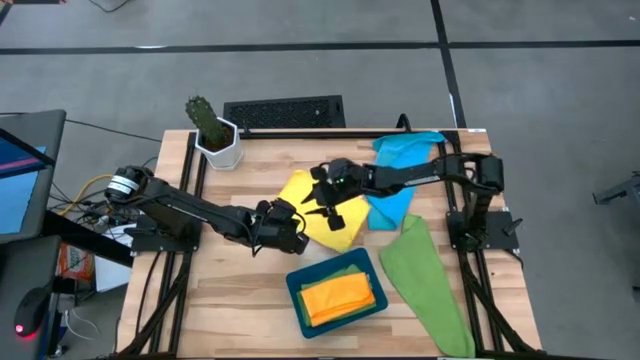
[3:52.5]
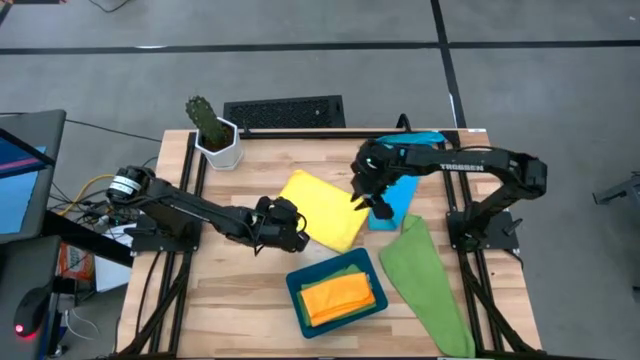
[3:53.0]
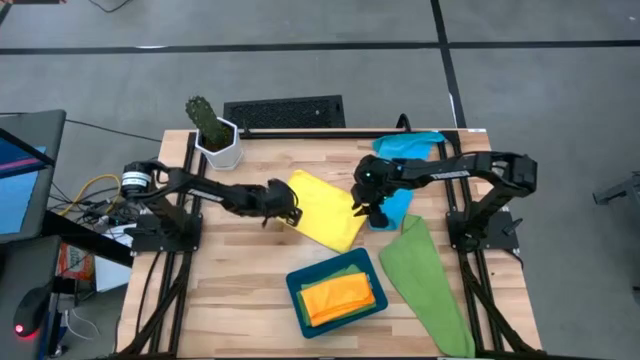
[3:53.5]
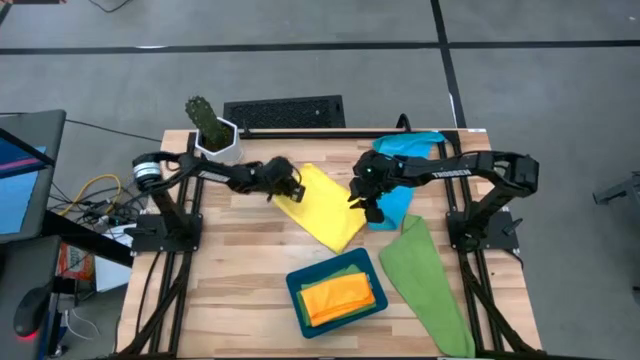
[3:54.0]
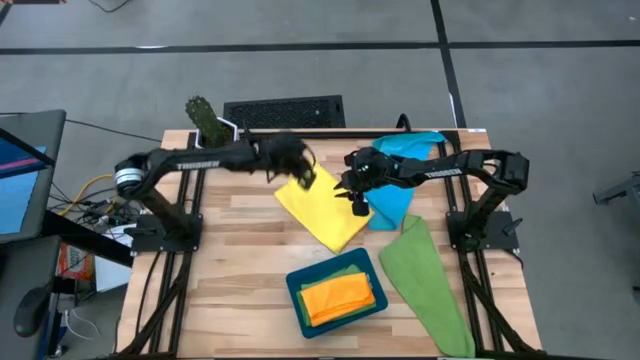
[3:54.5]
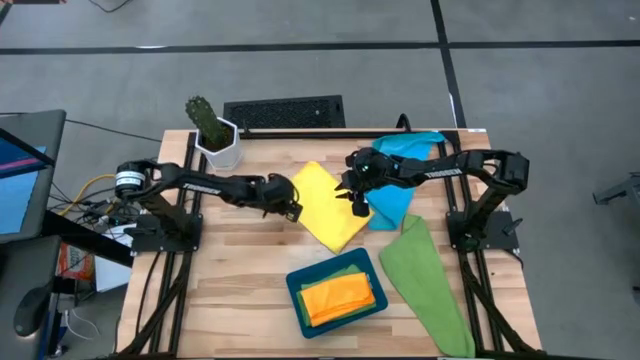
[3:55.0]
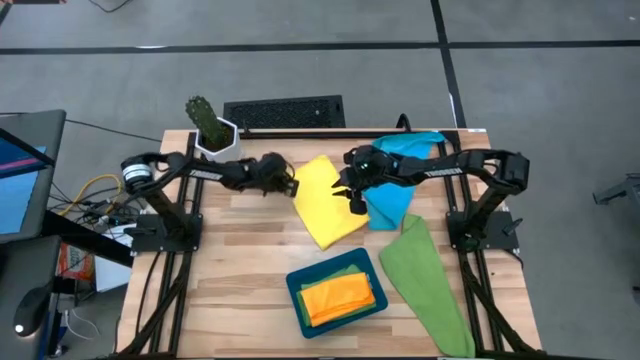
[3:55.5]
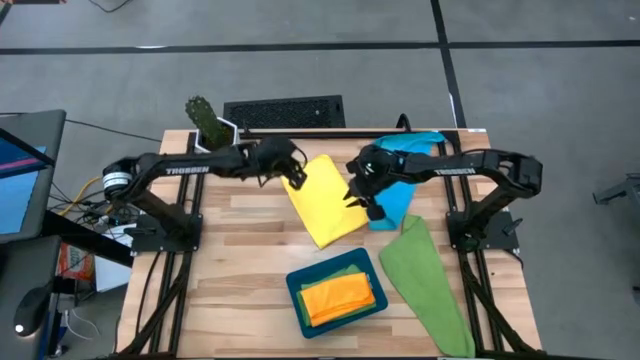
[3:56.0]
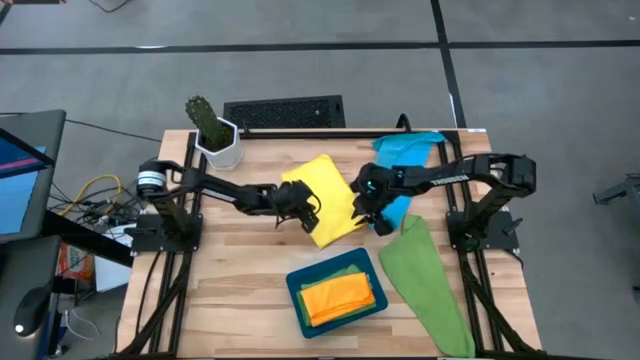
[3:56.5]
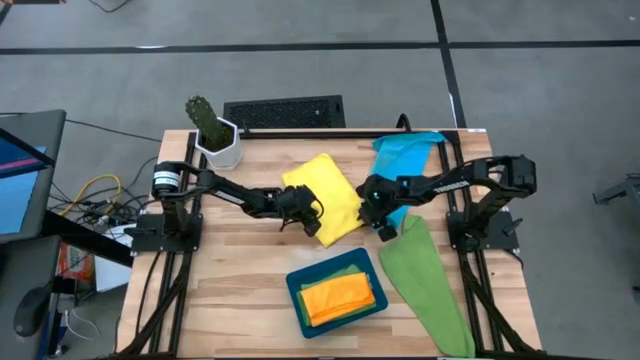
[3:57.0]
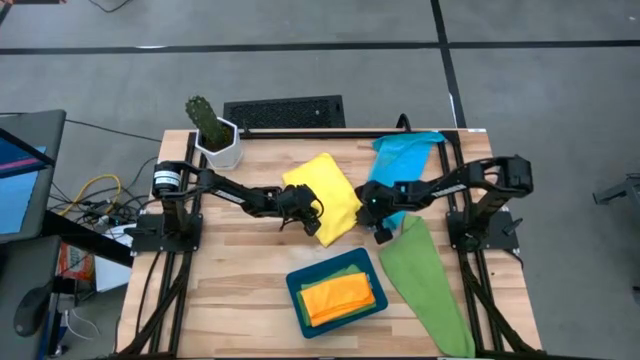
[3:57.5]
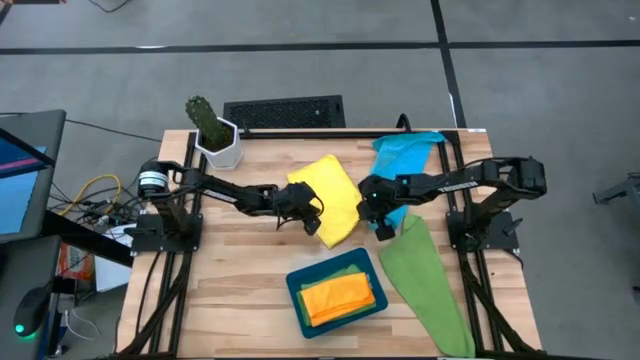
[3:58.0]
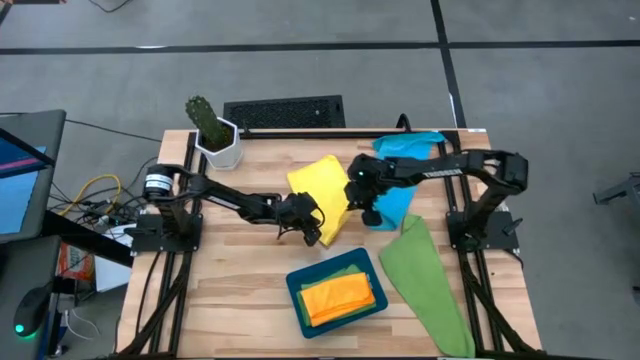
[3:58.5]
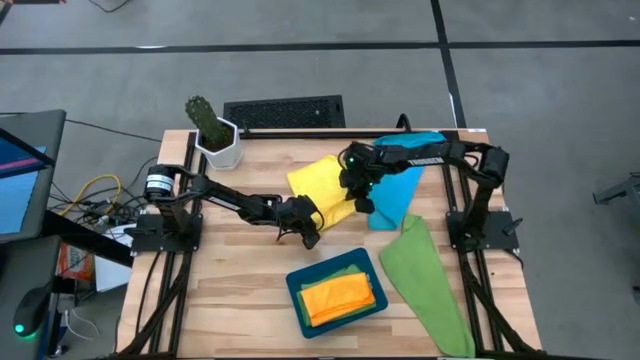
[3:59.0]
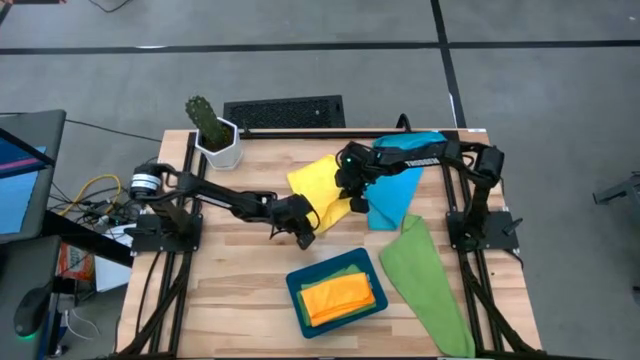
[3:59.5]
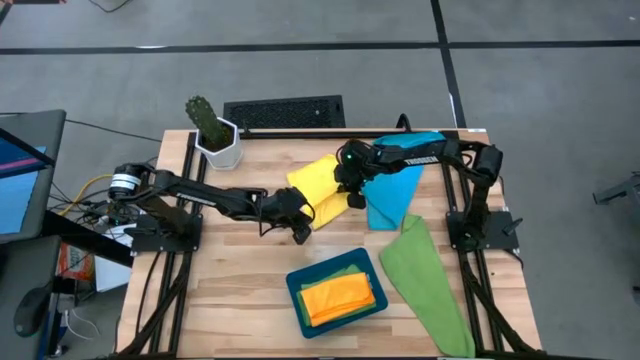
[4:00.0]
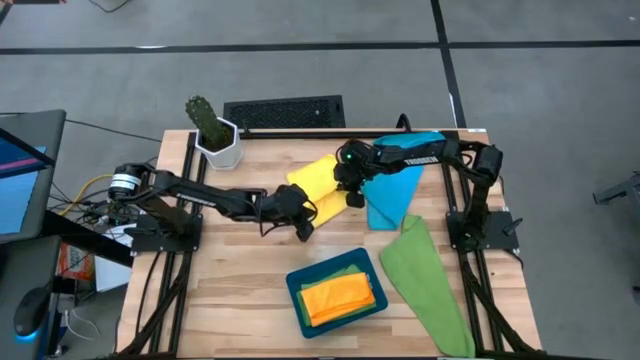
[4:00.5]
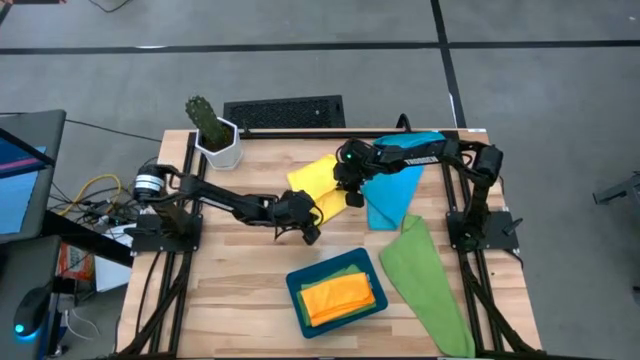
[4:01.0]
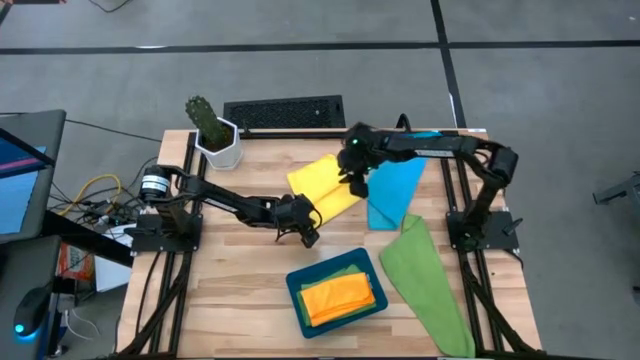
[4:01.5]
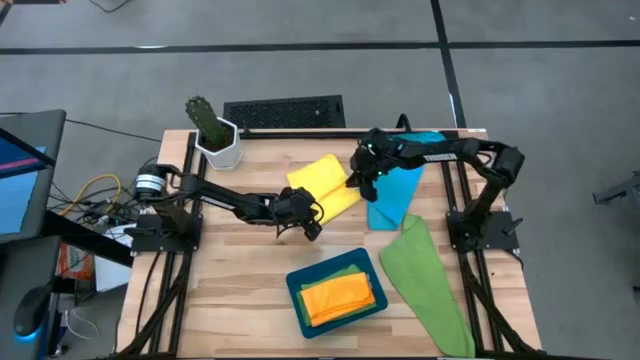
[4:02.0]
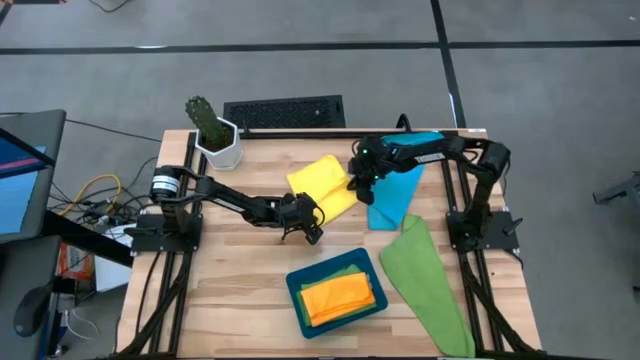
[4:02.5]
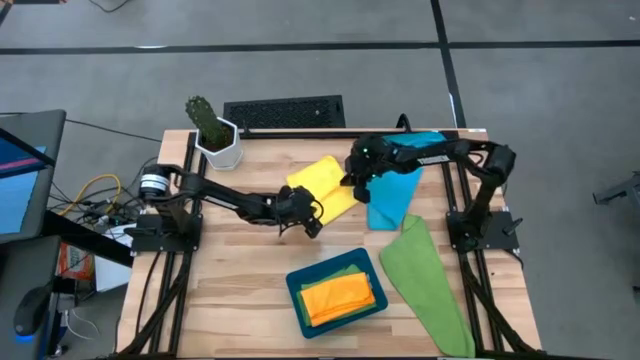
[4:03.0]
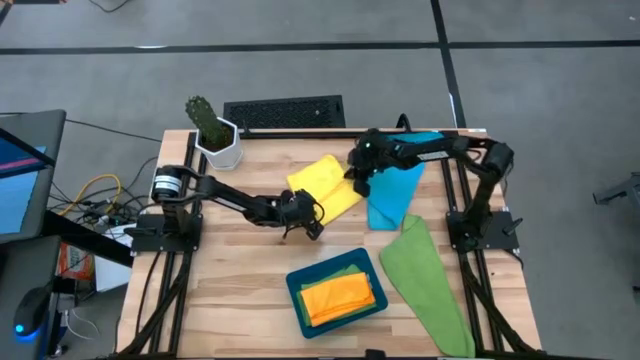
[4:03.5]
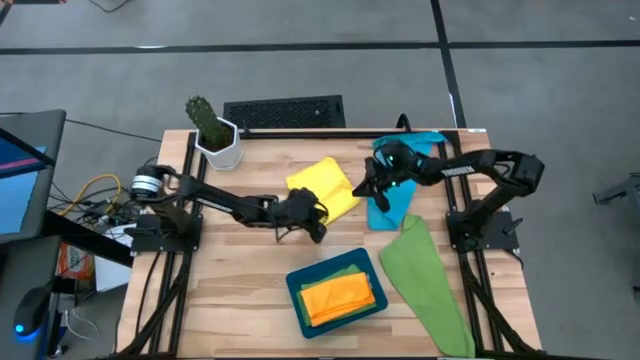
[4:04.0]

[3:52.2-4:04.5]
Task: Fold microfiber towels
Fold the yellow microfiber towel

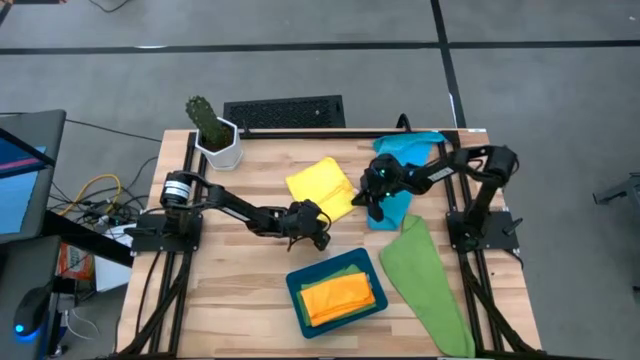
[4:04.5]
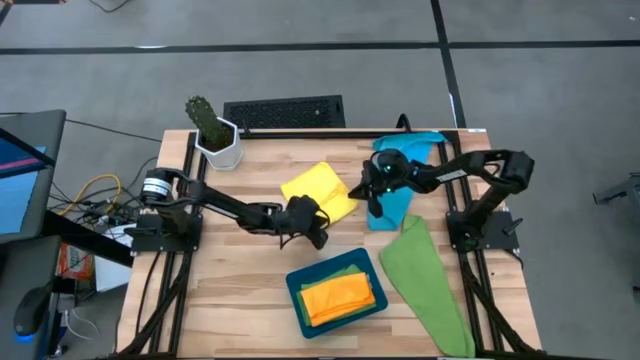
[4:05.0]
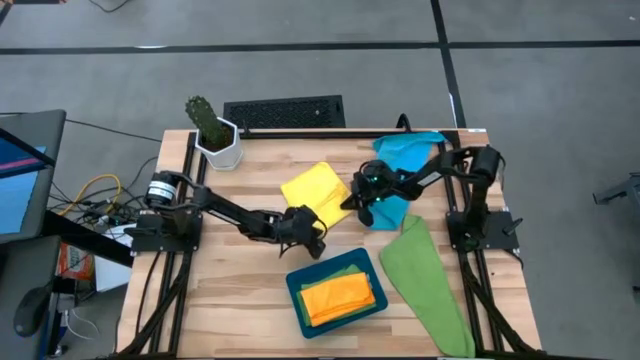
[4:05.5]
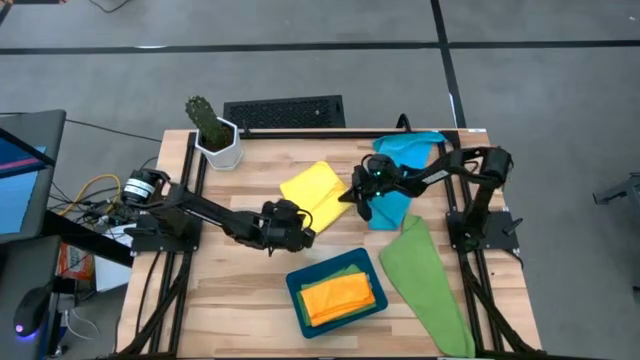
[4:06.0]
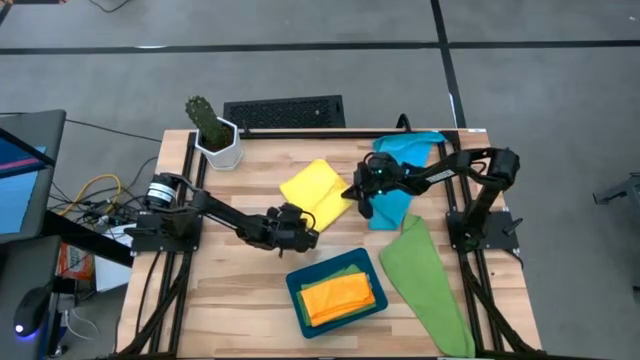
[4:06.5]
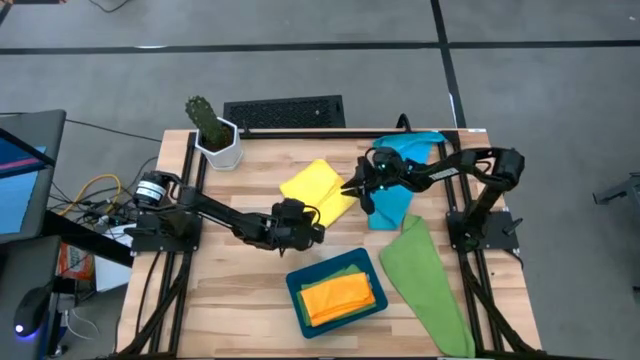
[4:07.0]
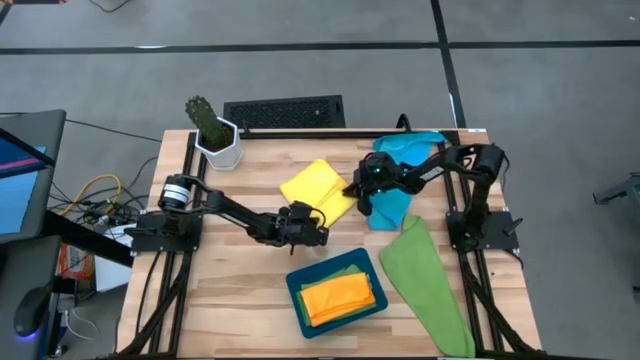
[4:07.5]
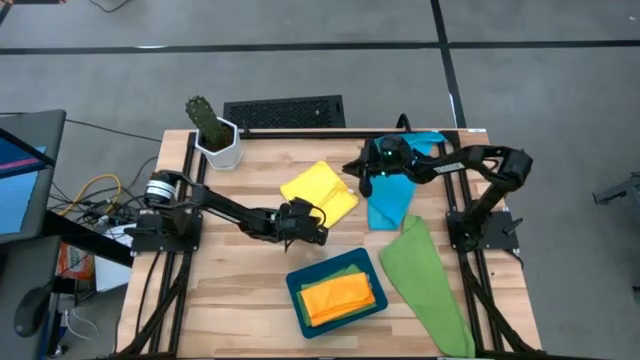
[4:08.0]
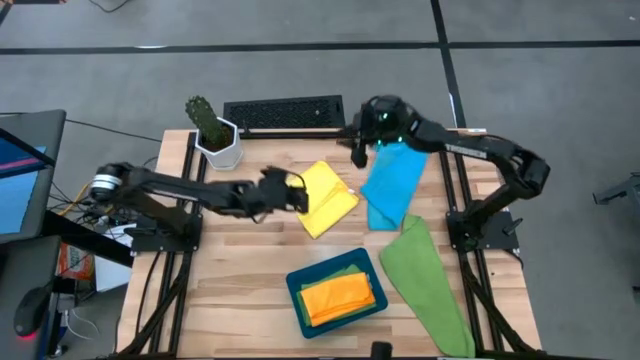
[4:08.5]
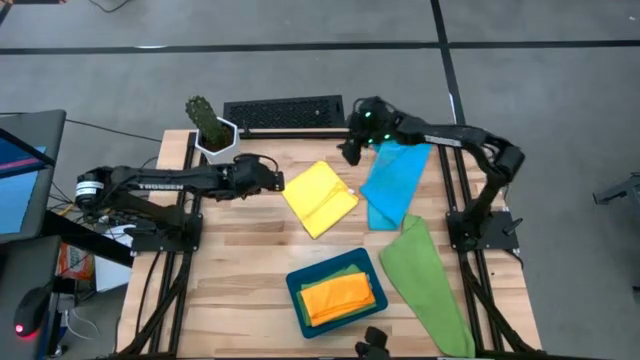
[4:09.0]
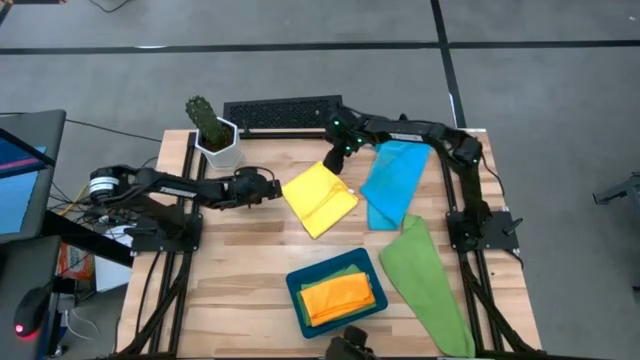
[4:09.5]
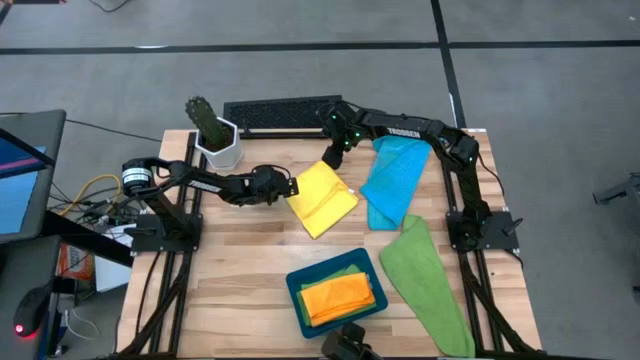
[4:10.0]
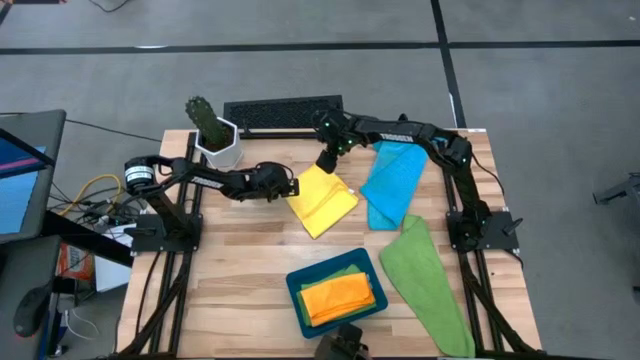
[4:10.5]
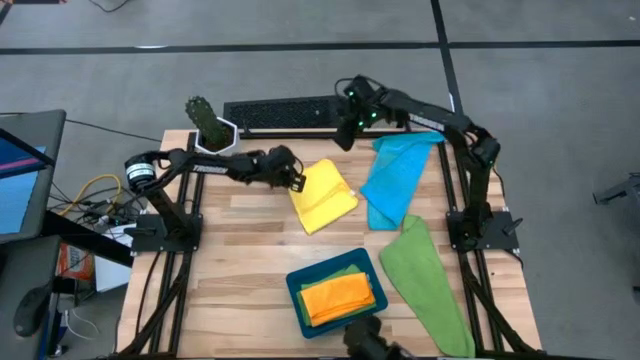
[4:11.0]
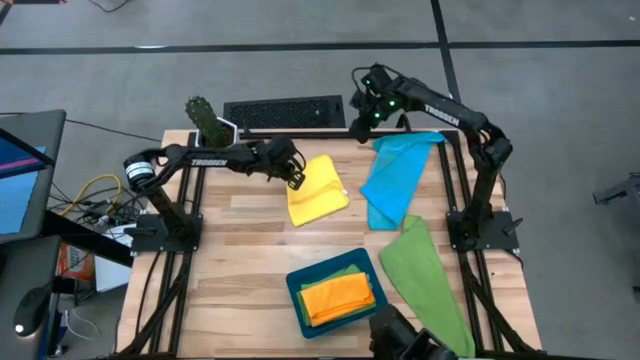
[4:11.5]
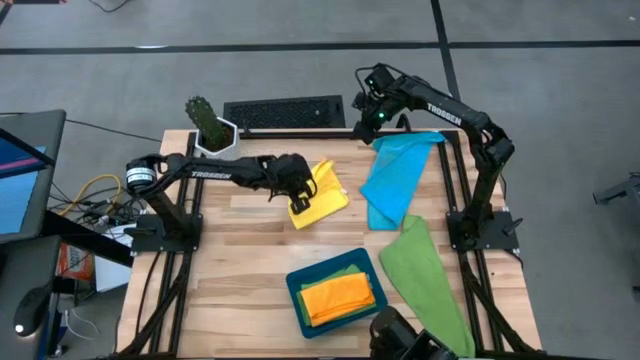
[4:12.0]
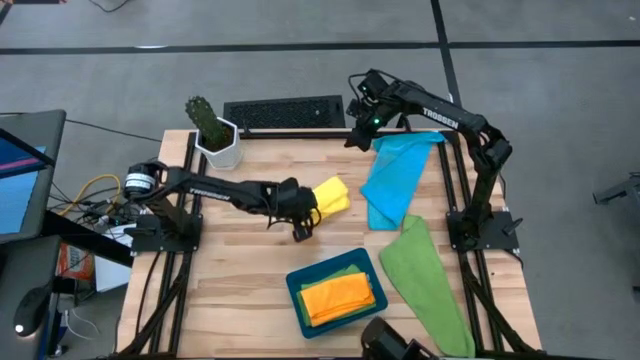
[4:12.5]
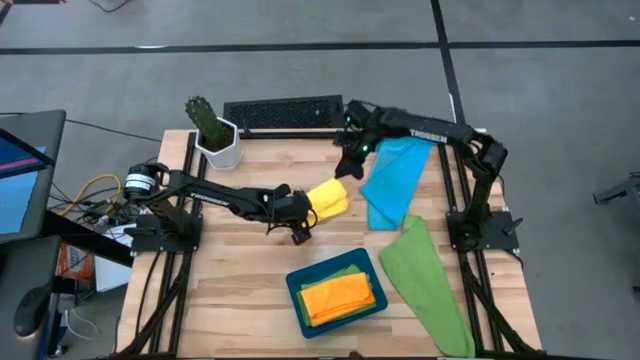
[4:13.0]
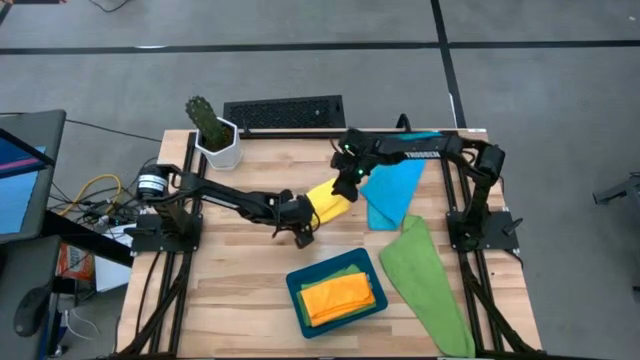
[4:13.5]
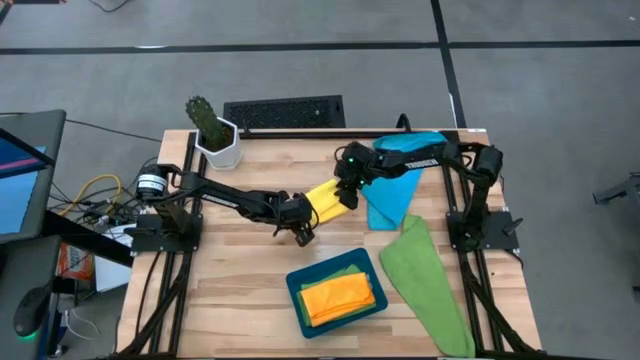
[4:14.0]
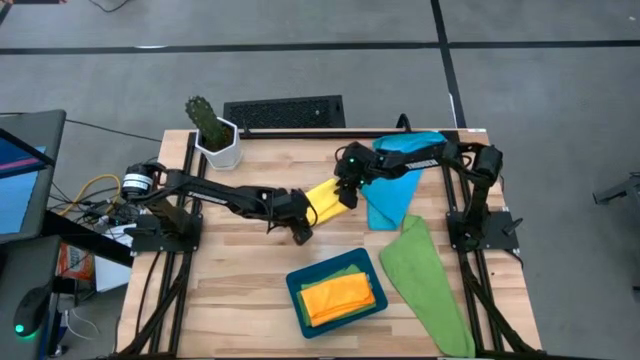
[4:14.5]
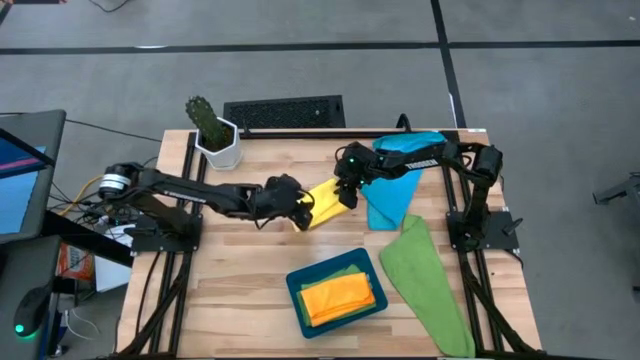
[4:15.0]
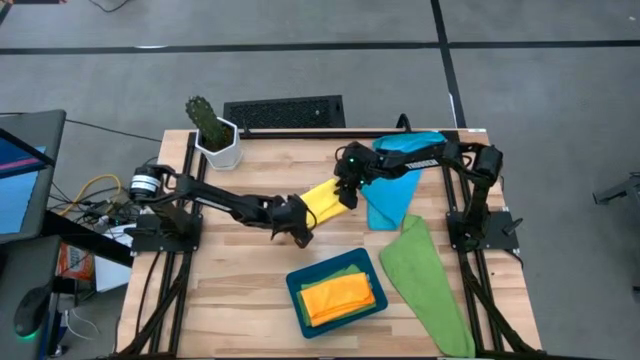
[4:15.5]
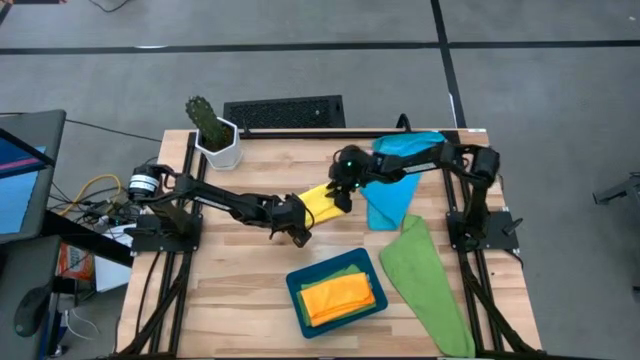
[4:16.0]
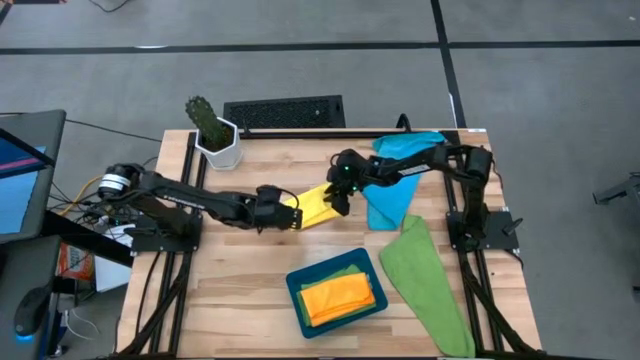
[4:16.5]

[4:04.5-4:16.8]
Fold the yellow microfiber towel
